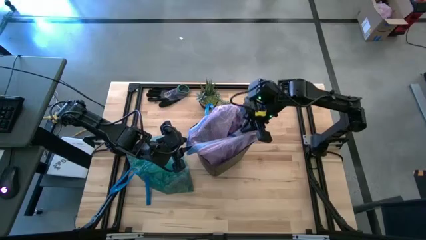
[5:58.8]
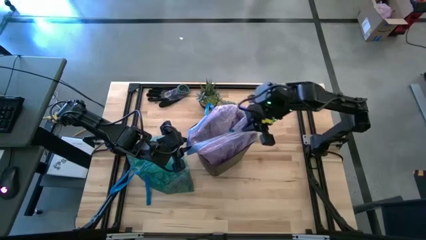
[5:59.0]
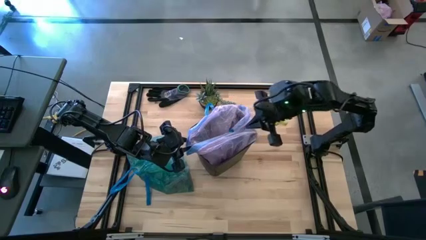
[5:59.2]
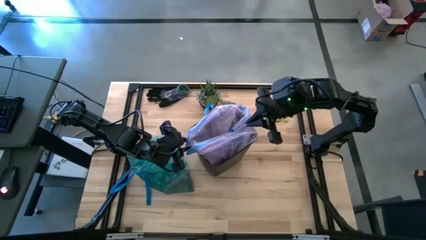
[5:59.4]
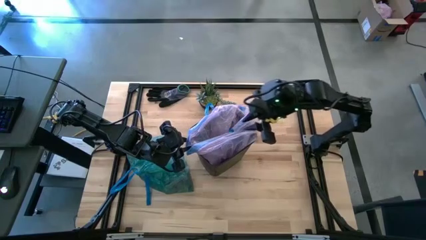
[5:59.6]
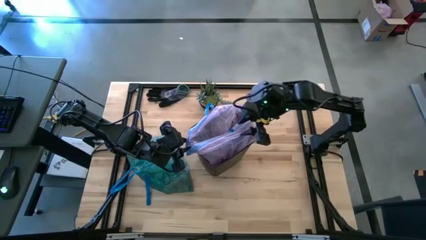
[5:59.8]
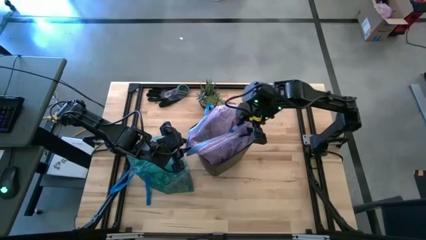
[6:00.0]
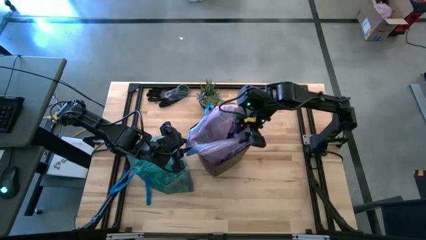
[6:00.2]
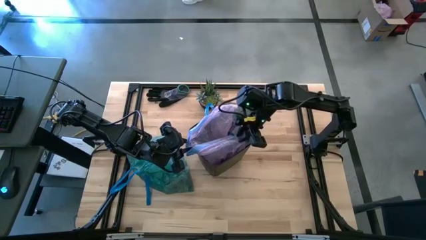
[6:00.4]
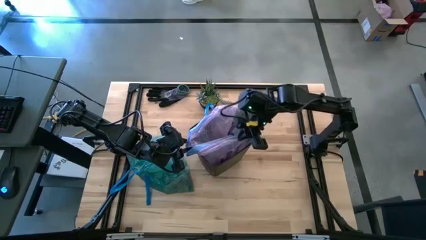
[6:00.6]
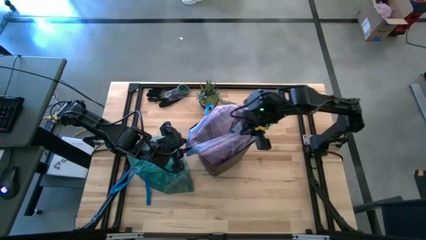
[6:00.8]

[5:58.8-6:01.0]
Task: place trash/remove bag and relplace
Put the pink trash bag into the trash bin

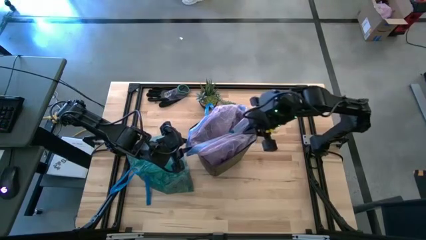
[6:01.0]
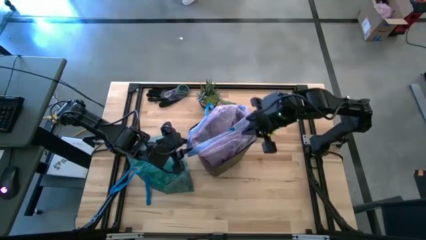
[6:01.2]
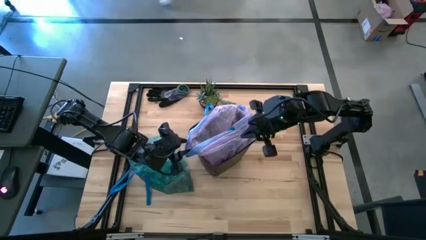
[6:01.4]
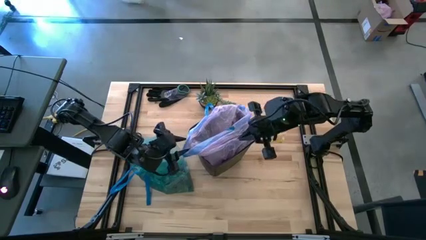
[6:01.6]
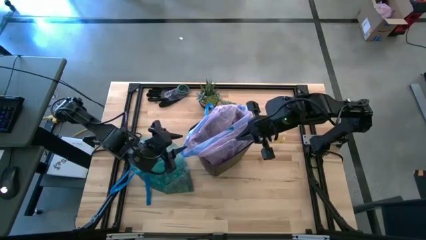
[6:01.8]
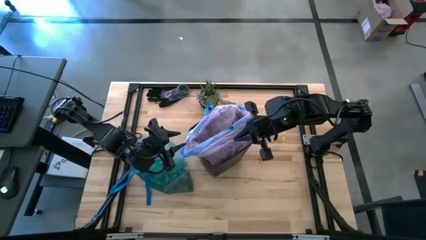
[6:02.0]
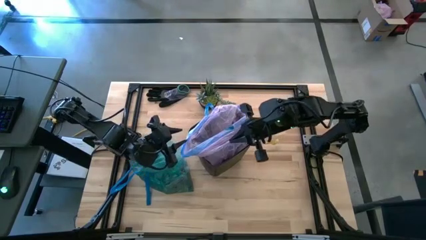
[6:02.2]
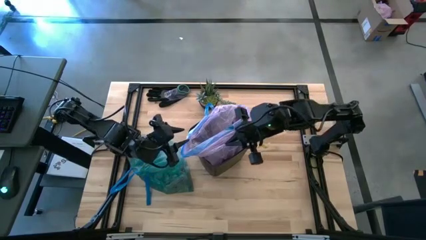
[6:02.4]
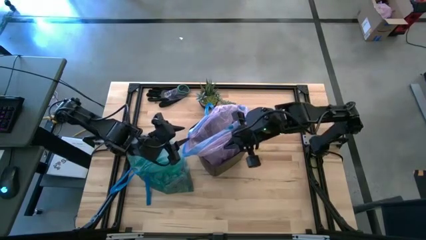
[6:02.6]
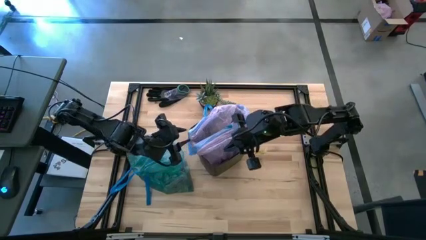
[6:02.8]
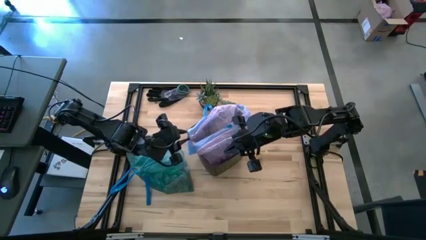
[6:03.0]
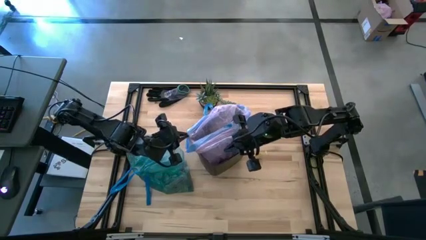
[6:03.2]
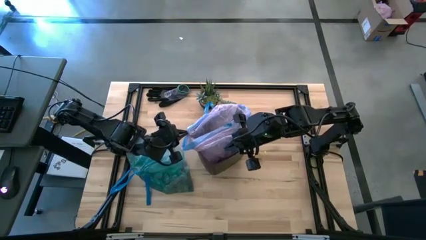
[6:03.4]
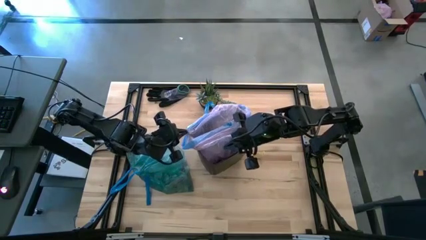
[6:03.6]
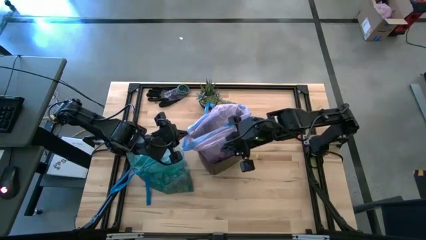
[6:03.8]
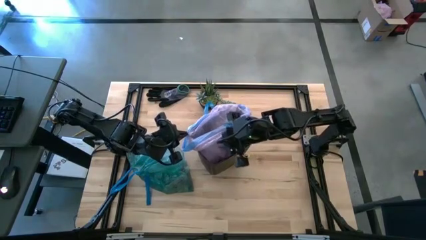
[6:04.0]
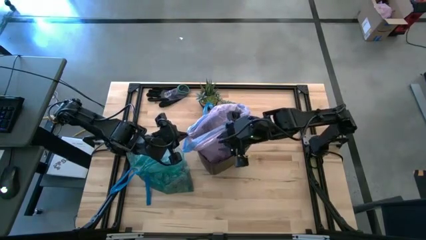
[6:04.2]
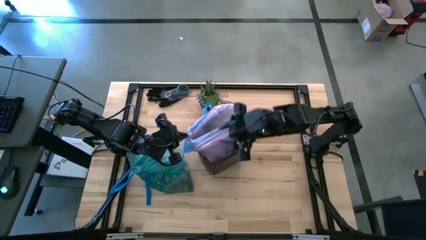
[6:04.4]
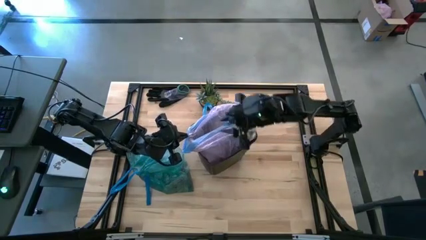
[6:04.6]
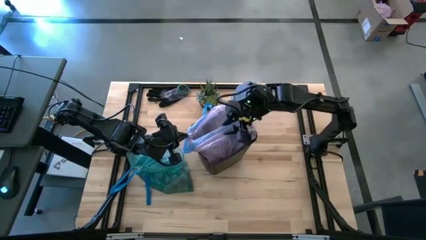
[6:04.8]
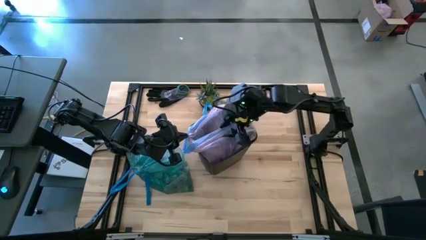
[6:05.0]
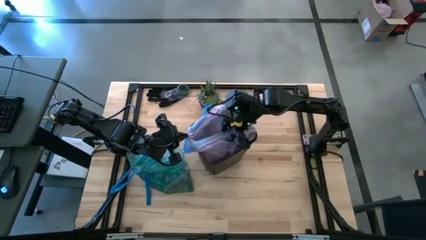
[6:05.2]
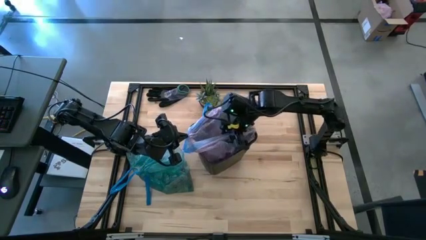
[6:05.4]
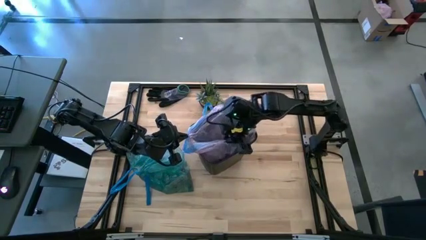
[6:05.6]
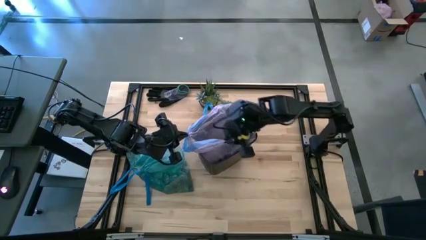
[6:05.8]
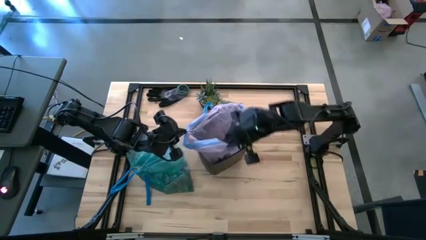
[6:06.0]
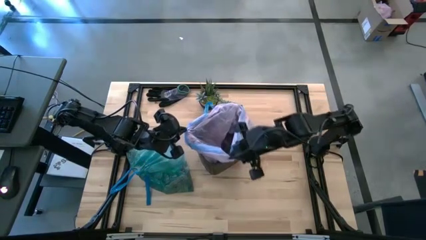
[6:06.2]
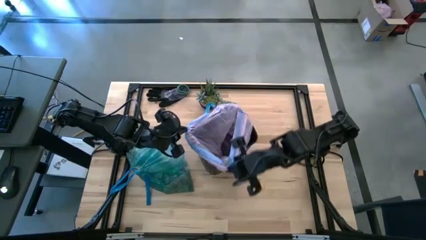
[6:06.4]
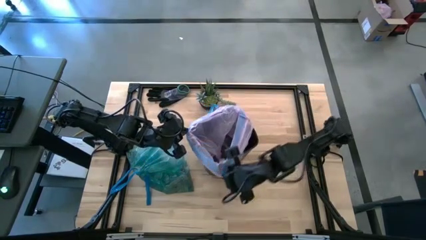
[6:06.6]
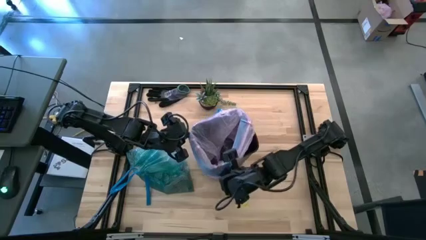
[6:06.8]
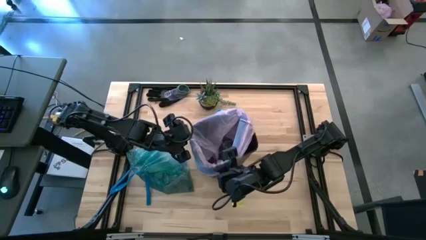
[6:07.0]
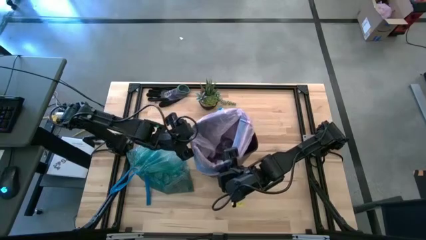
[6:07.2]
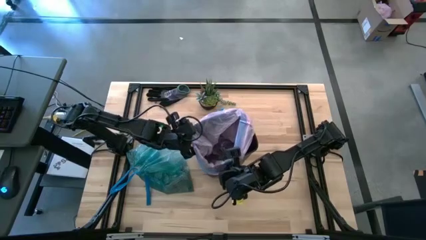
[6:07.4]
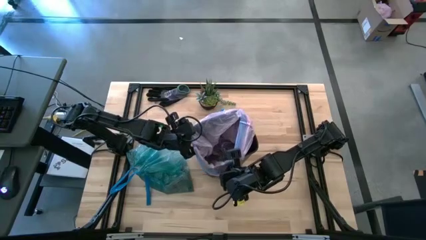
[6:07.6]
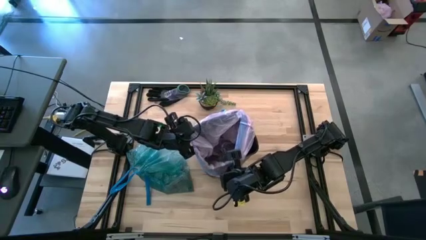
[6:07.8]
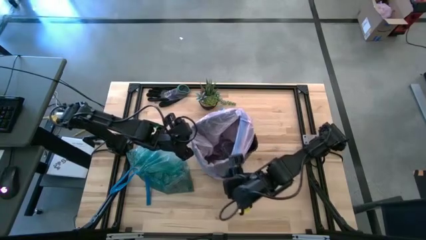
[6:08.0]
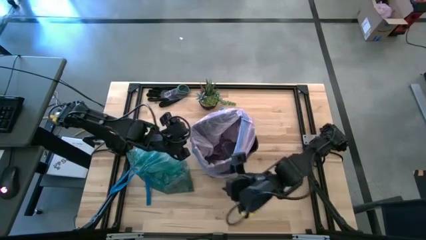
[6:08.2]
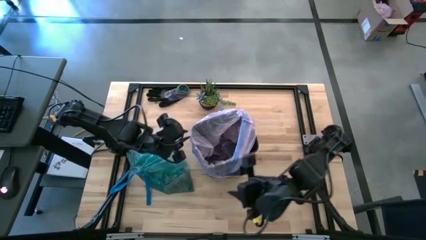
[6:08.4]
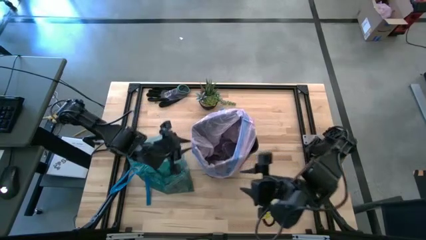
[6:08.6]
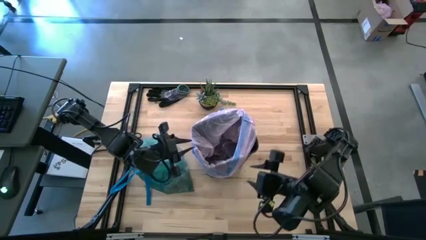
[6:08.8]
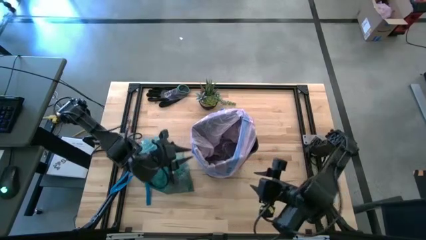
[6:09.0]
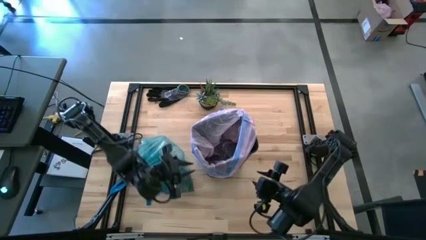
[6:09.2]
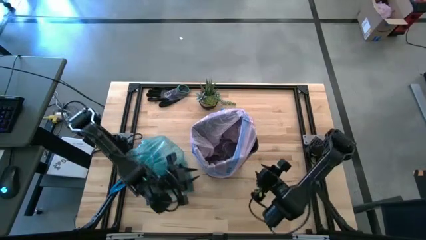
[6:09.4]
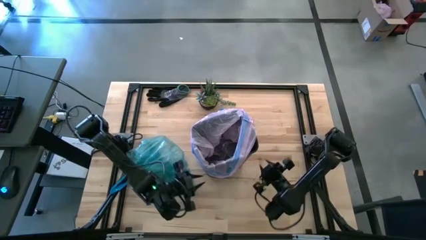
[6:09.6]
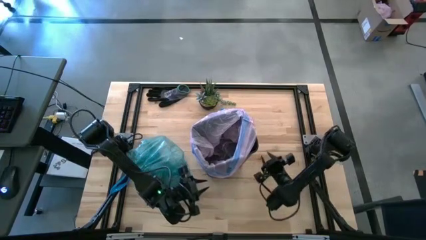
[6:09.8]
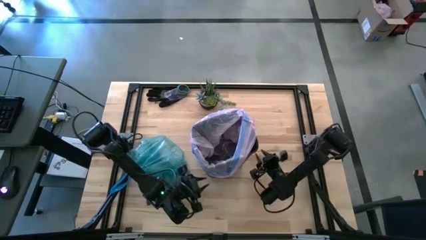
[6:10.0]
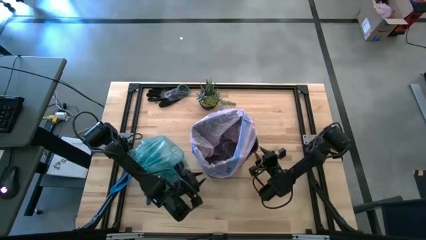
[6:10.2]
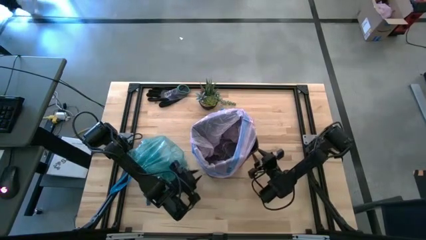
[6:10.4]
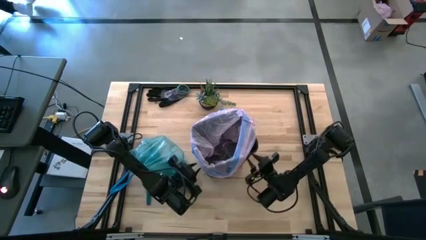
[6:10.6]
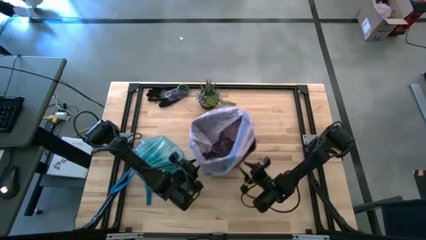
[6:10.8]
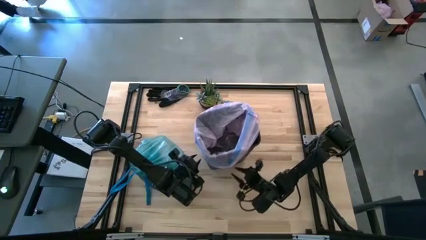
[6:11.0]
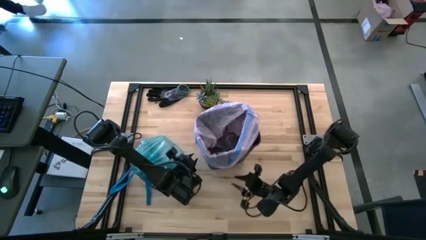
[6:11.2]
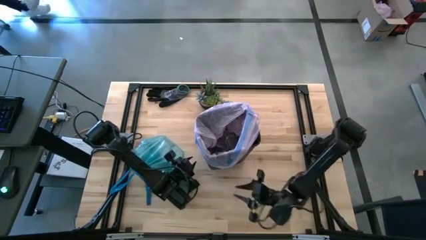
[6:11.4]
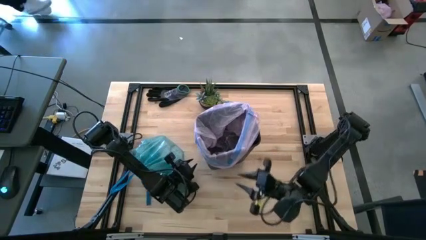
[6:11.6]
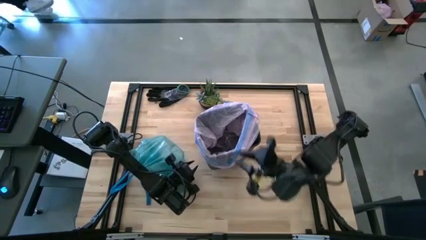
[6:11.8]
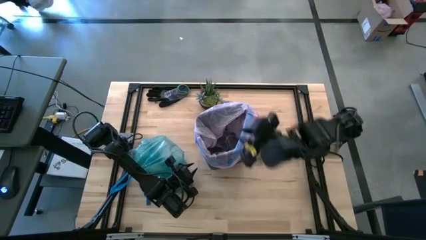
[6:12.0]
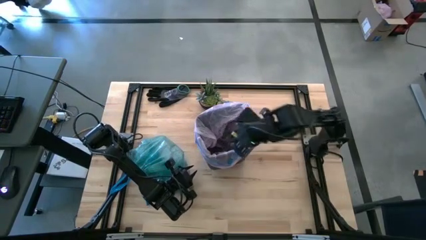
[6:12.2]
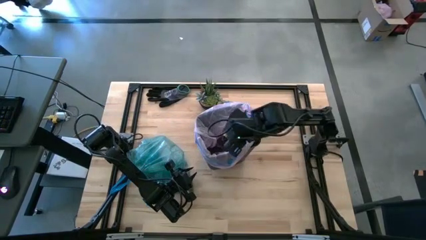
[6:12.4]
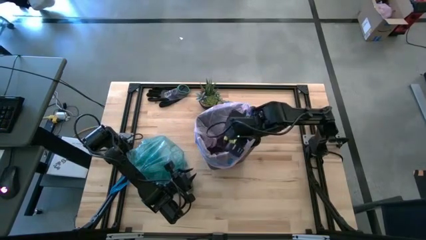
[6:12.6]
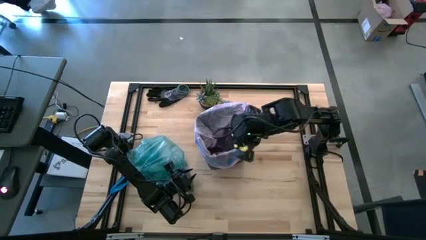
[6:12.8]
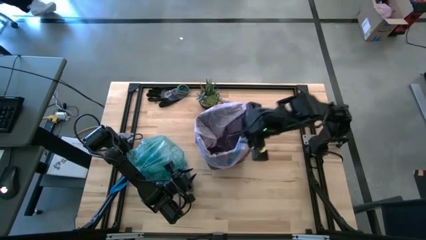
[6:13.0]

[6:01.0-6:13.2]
Put the pink trash bag into the trash bin

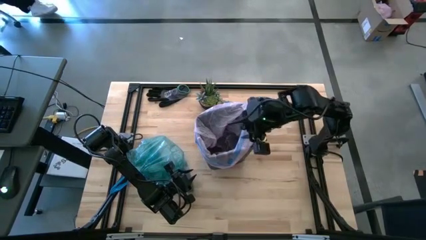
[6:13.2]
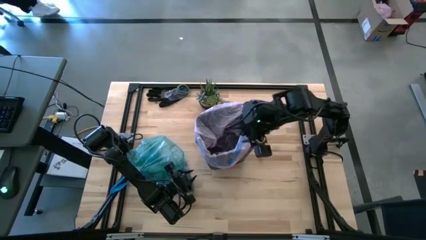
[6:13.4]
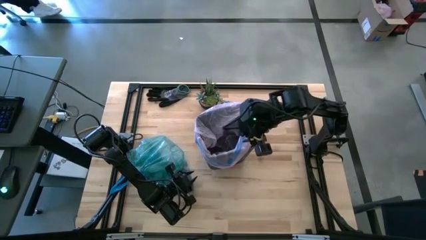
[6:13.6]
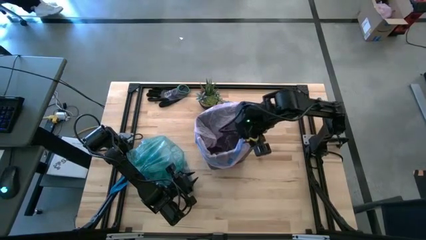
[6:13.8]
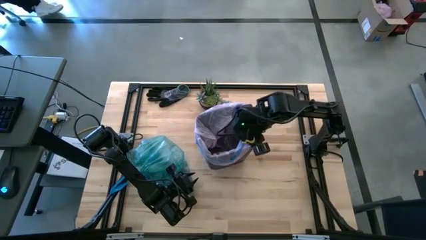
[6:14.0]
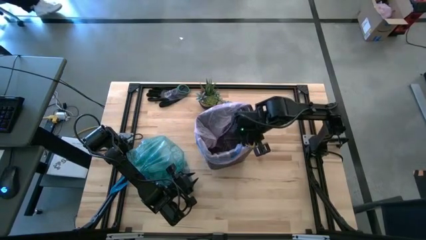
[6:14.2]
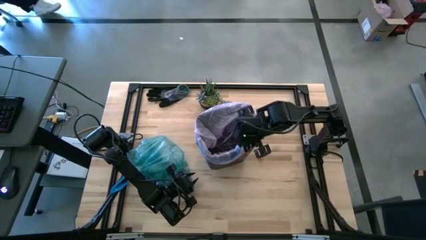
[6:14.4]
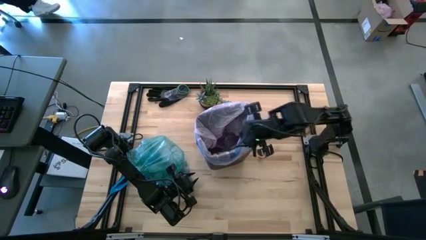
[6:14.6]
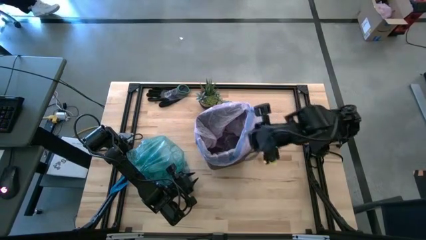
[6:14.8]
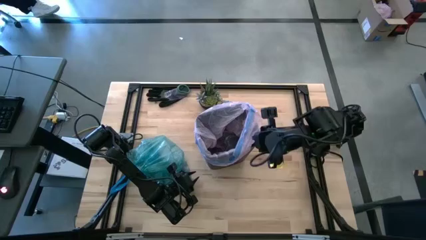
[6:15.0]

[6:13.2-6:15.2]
Put the pink trash bag into the trash bin
